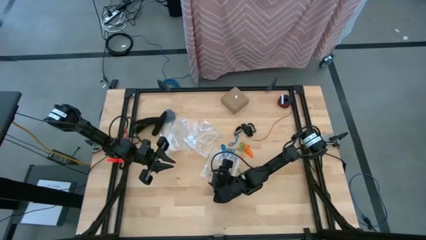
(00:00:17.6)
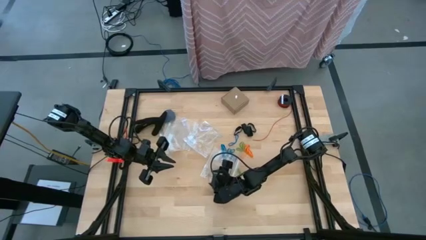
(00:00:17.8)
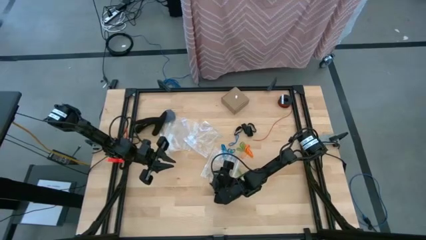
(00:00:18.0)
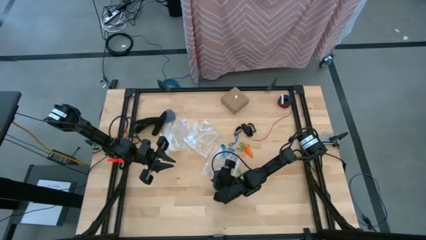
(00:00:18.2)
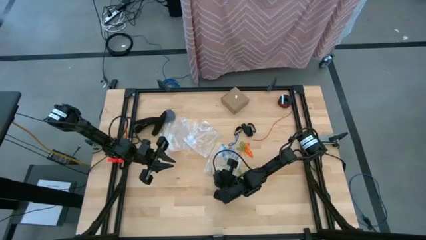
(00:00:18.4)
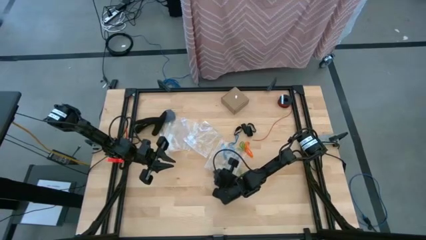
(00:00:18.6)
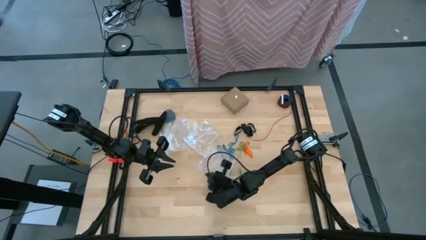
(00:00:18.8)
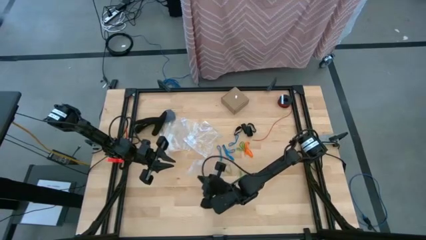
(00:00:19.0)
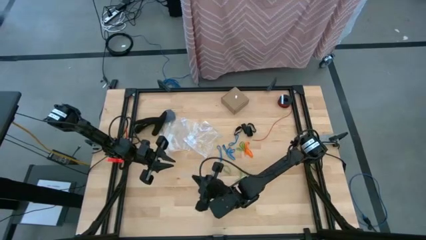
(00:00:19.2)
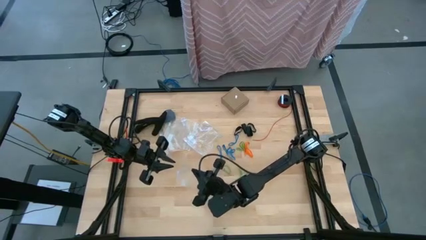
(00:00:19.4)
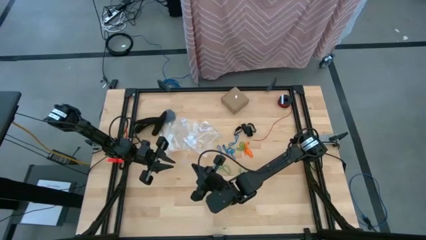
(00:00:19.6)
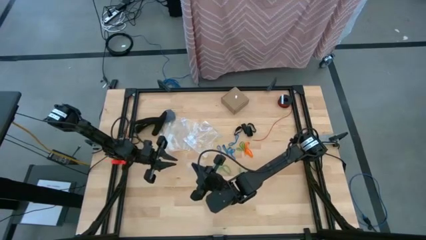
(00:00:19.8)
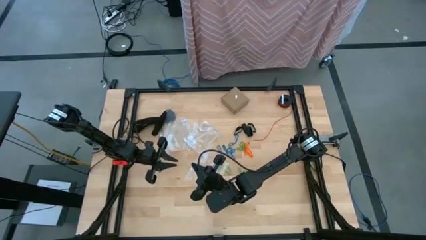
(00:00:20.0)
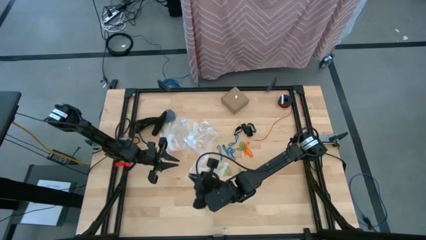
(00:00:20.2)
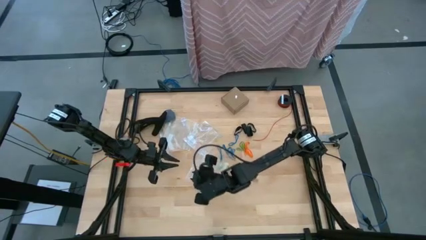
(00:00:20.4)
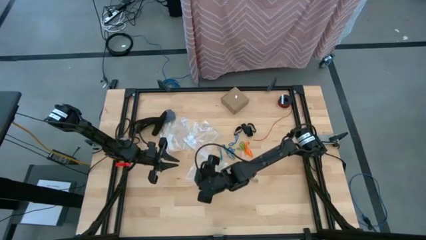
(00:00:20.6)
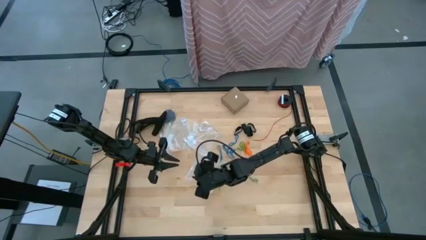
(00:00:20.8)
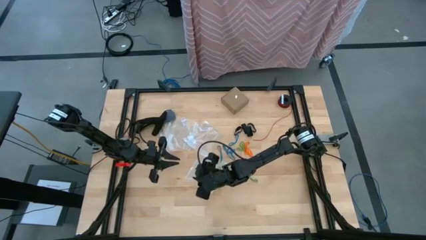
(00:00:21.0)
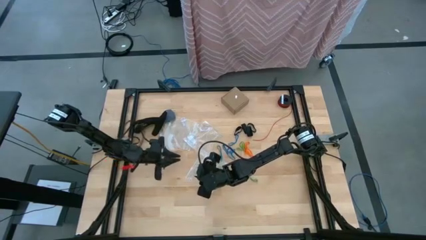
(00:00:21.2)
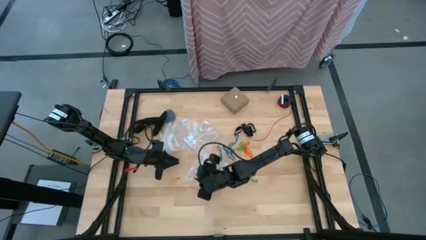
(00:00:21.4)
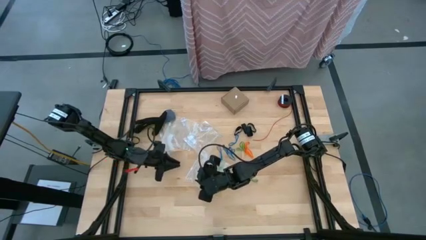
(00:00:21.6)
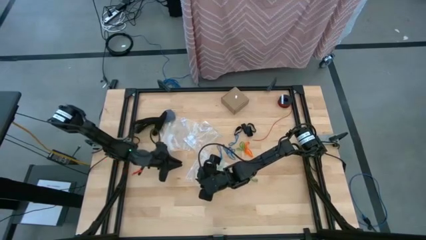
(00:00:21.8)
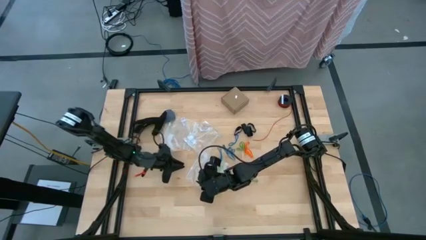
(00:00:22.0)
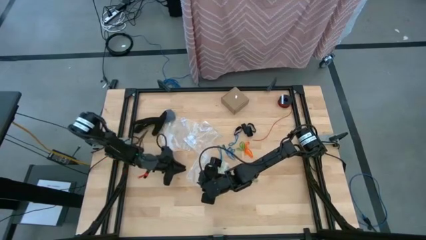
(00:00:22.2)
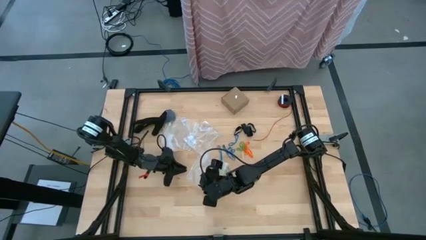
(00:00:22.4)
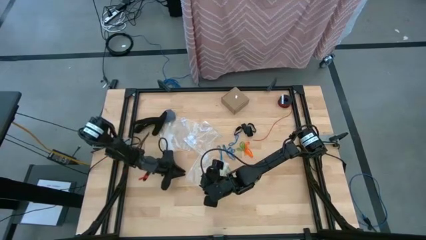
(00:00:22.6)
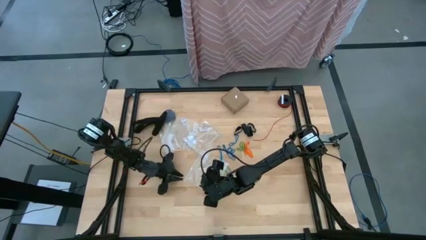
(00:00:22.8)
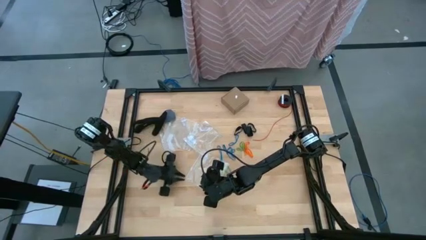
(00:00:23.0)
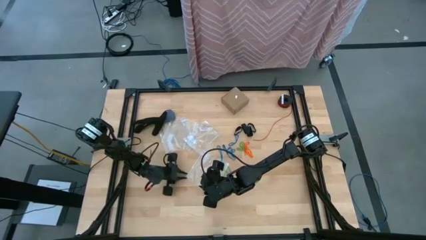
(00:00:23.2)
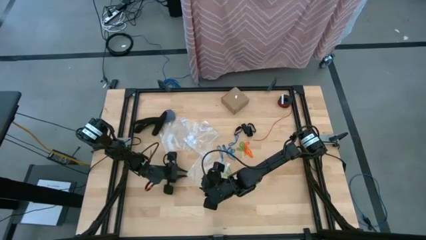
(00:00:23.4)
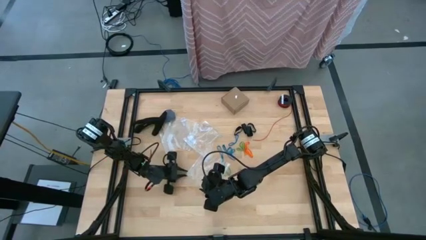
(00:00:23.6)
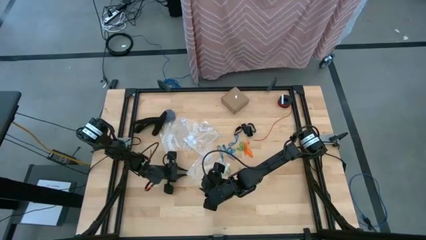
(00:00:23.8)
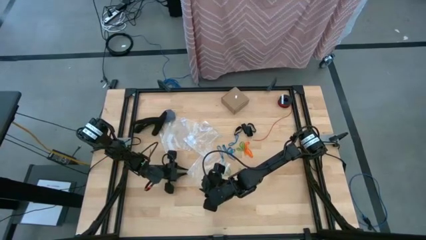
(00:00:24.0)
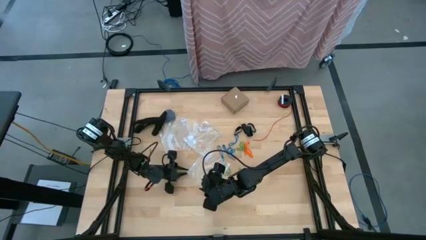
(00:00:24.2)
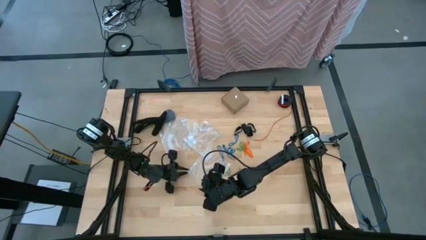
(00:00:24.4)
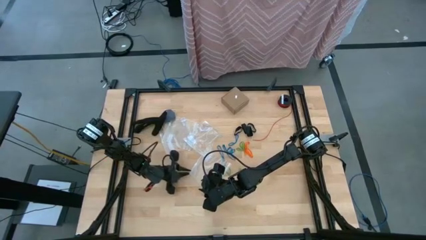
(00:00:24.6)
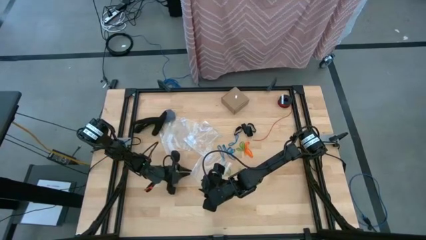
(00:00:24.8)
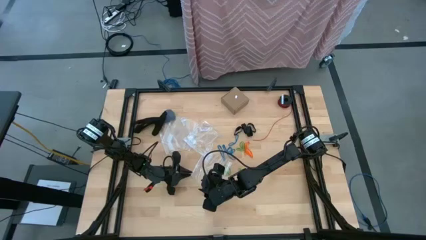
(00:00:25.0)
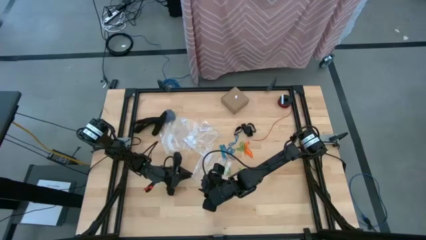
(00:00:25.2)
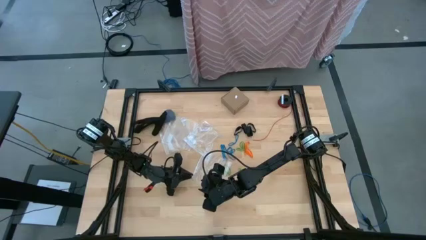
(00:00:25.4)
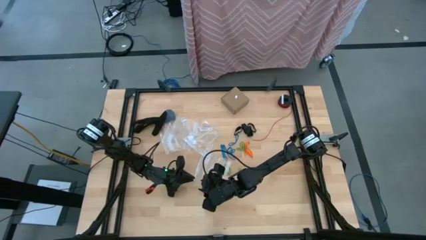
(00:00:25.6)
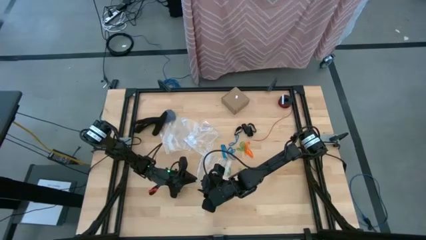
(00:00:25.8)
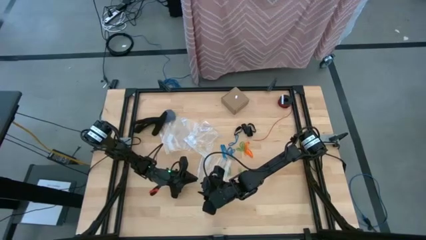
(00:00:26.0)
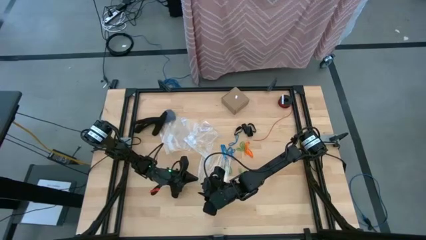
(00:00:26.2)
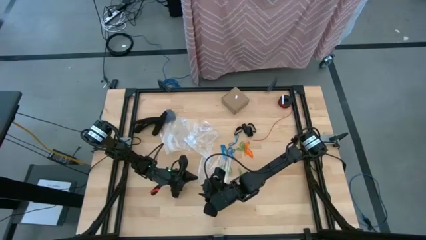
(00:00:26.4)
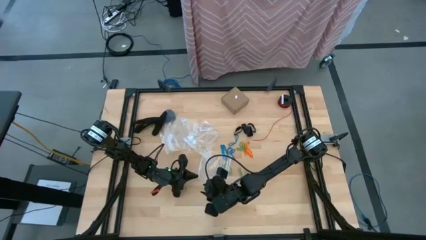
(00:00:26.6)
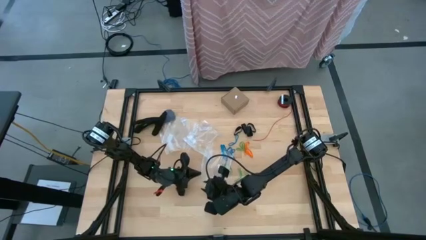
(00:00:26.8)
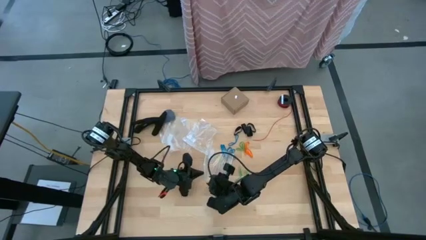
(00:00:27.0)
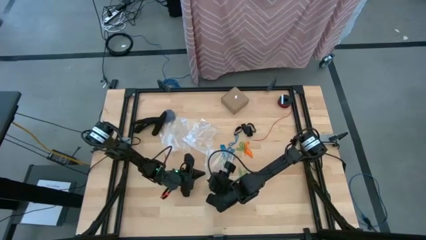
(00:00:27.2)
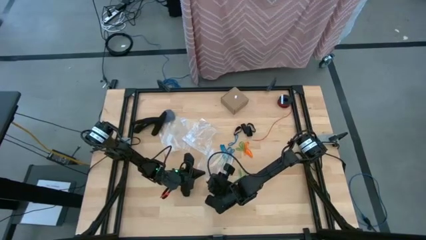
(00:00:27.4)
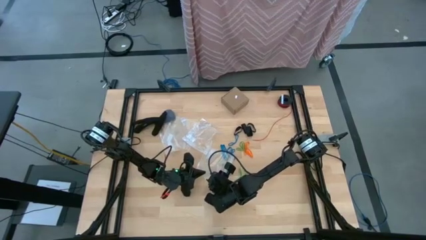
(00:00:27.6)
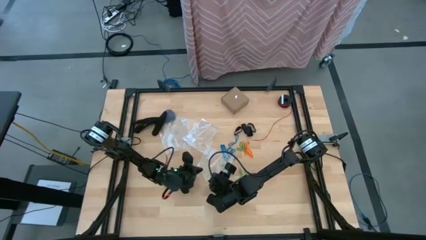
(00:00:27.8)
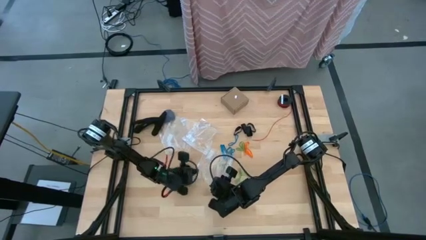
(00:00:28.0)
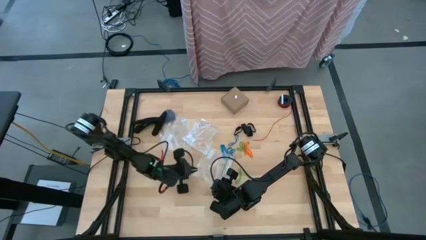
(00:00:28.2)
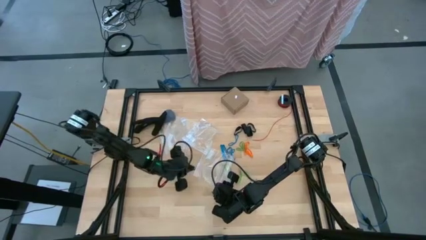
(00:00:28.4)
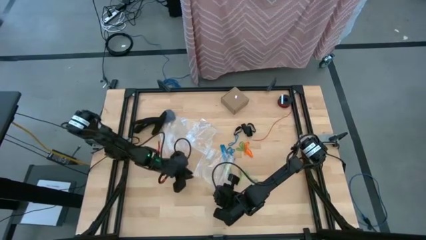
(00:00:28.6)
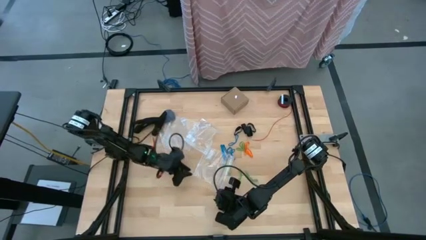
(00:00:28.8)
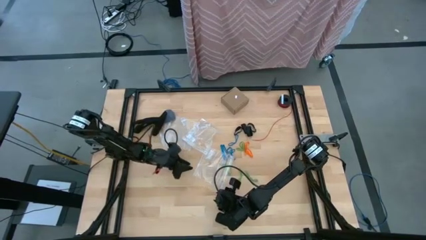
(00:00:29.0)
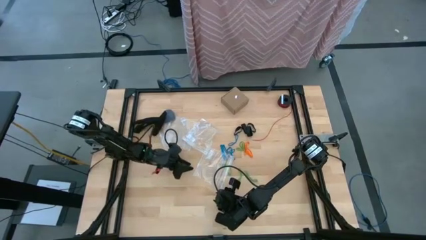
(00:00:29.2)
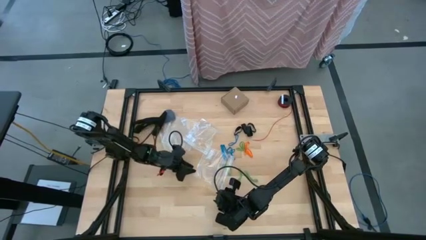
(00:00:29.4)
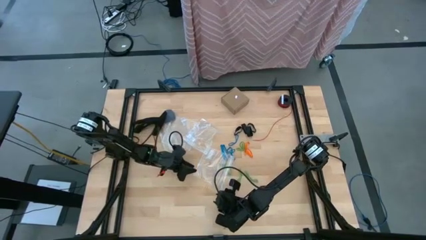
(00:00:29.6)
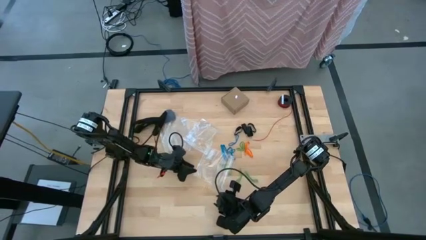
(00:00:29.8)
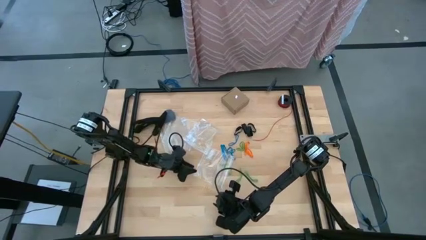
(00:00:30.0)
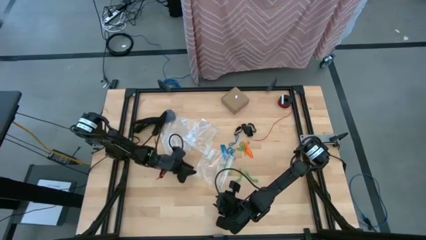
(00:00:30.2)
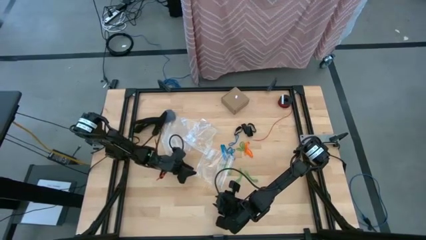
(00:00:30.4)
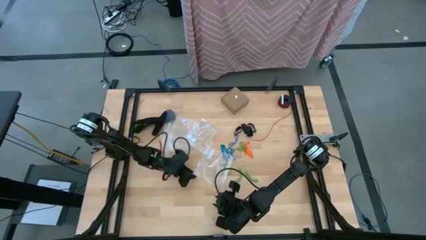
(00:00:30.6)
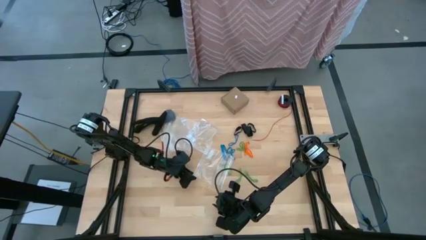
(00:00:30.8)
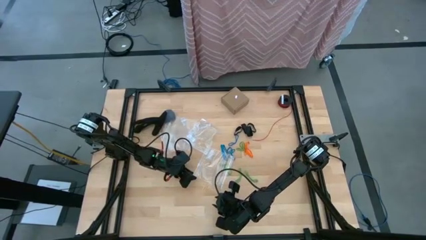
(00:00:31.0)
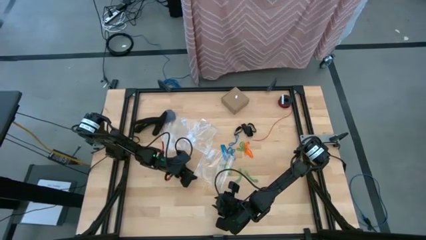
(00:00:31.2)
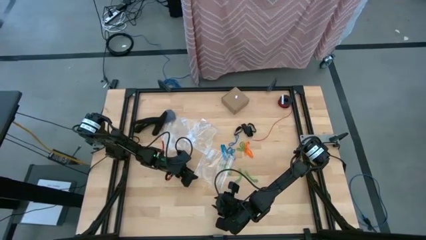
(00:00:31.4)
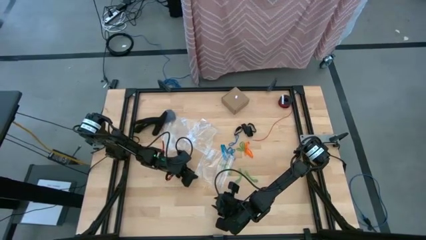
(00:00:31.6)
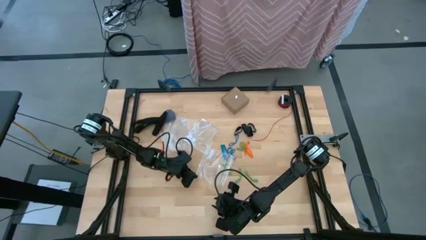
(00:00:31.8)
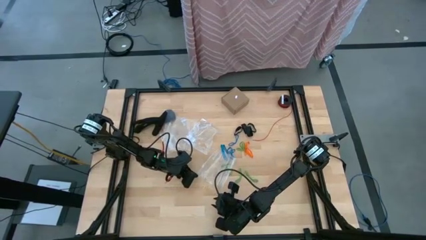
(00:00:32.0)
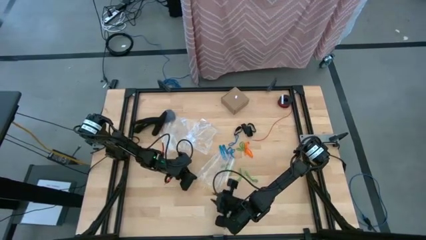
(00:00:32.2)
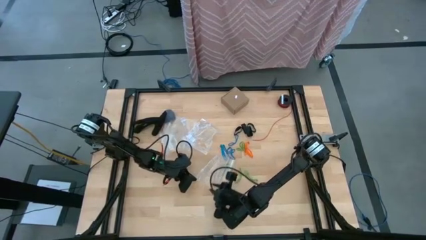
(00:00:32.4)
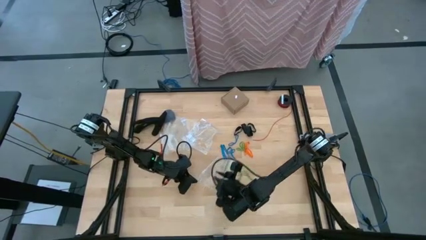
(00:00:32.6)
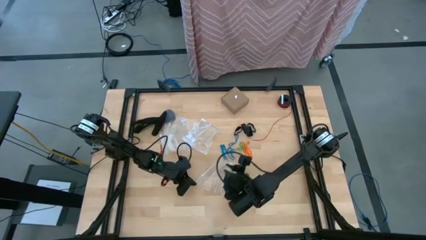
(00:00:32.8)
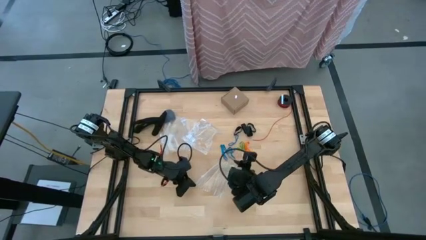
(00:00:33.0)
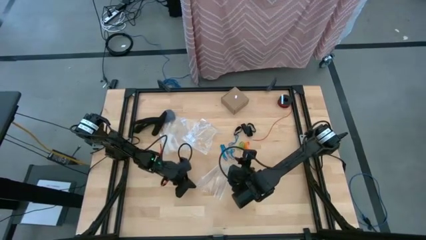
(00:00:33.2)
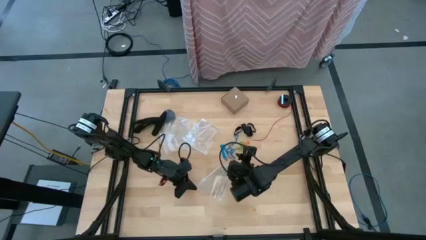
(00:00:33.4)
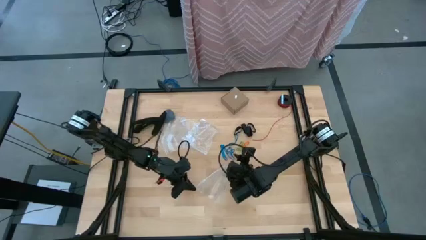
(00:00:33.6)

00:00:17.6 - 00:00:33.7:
Task: Sort rubber bands
Open the transparent zip bag
